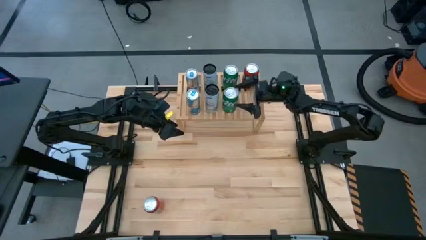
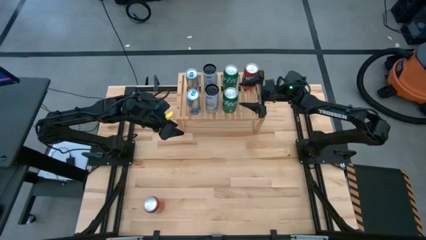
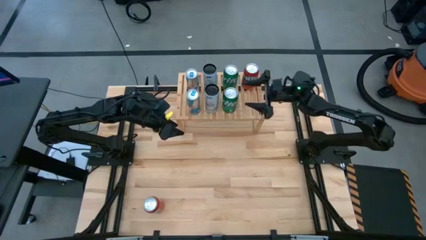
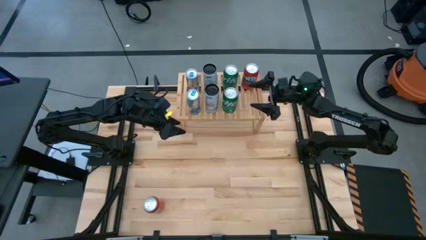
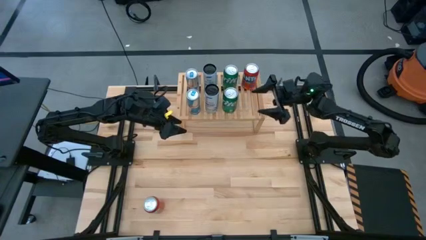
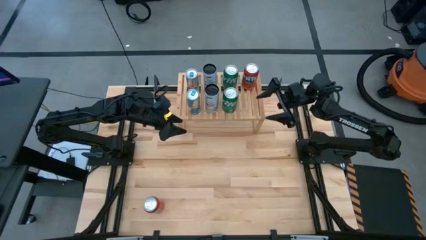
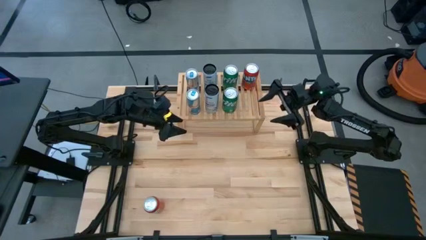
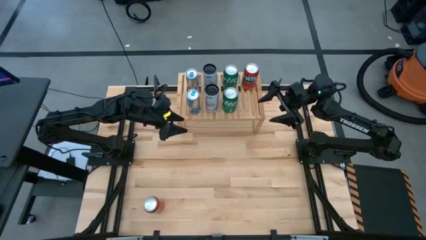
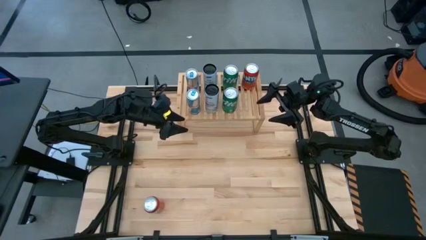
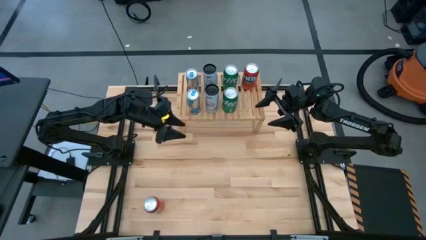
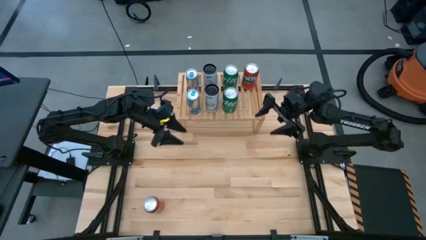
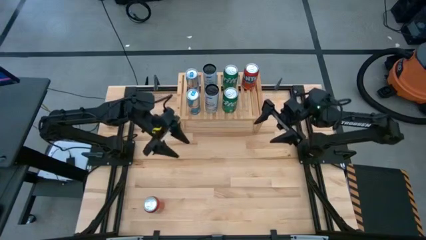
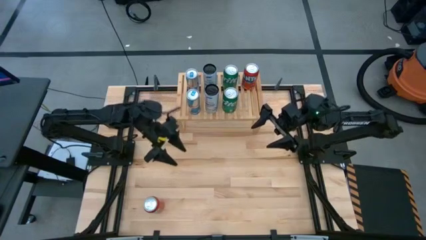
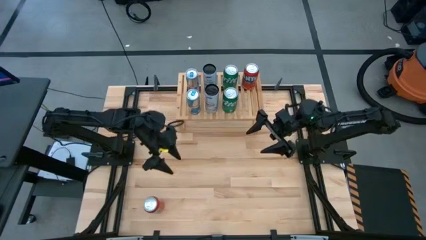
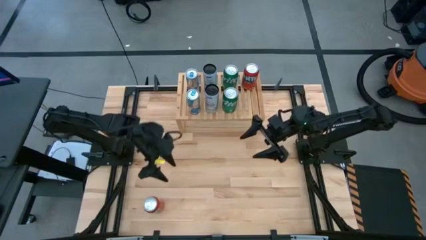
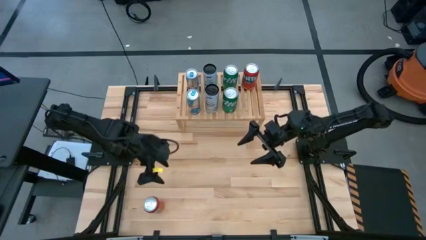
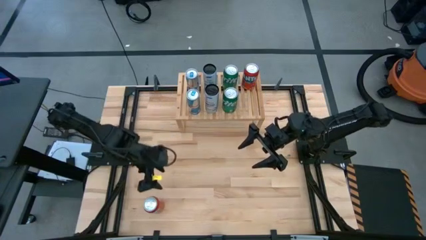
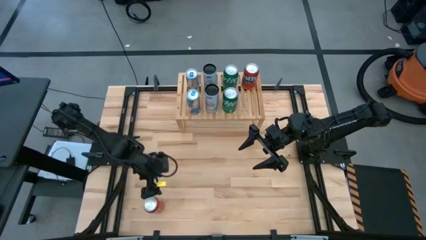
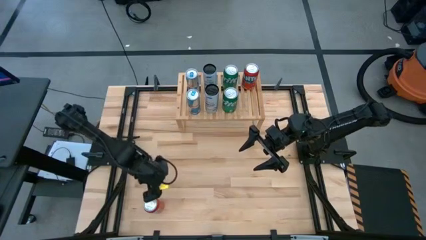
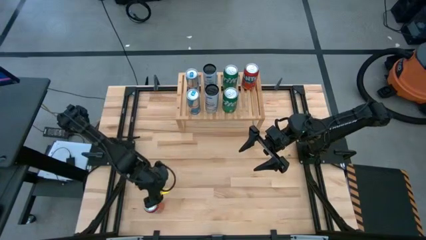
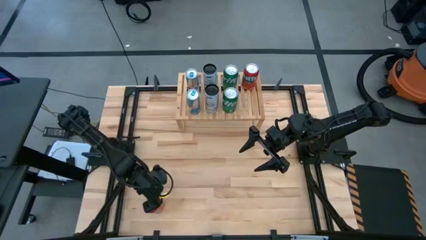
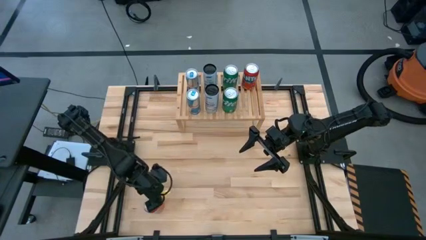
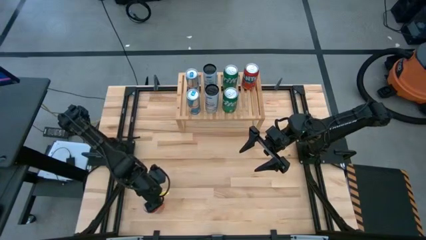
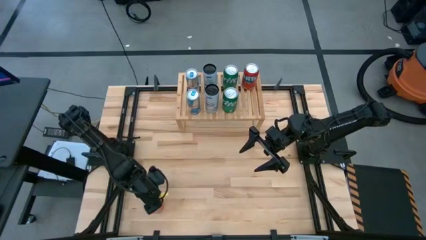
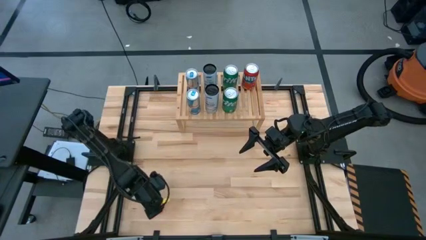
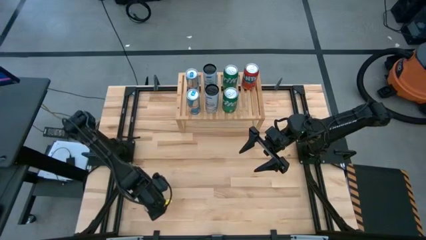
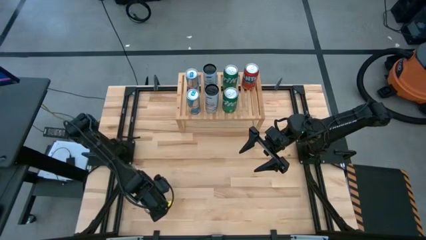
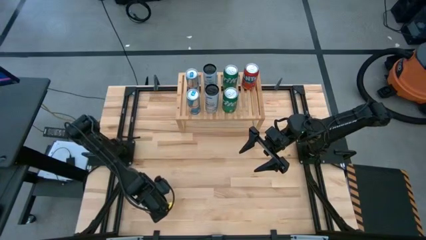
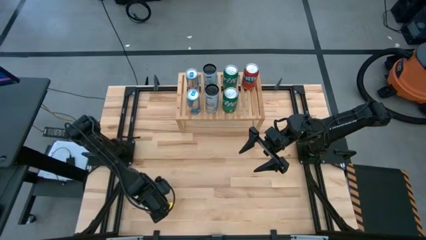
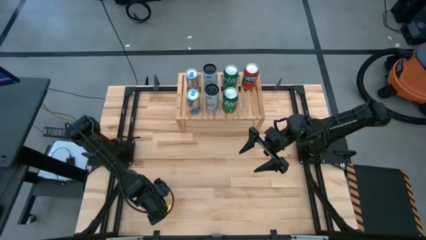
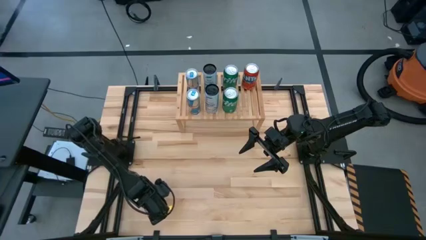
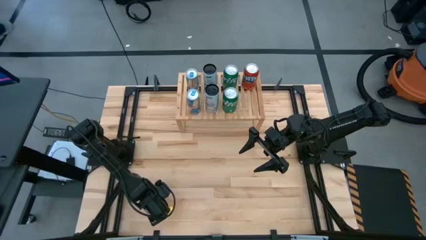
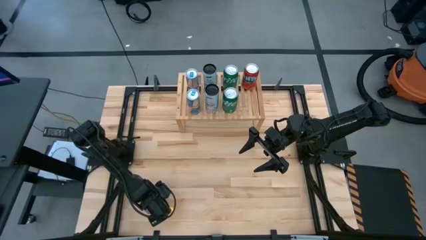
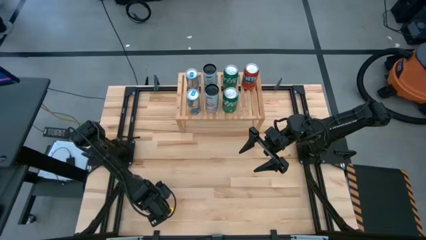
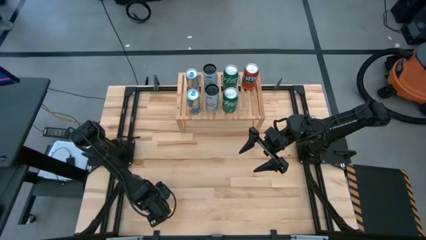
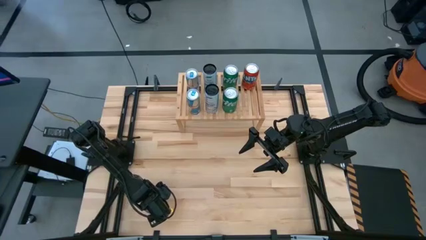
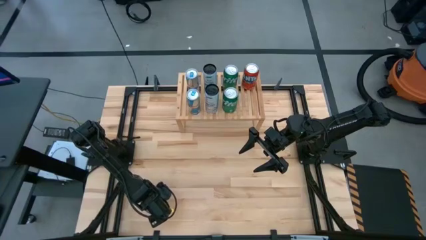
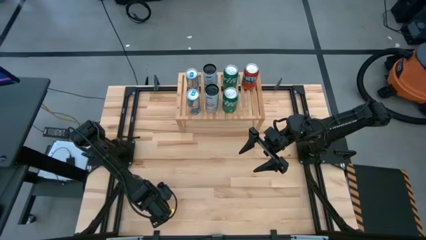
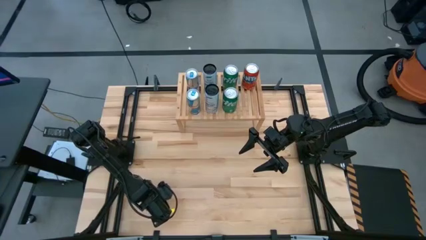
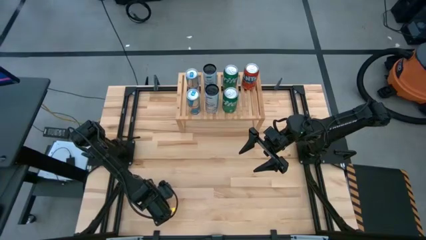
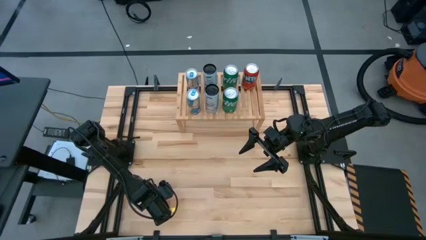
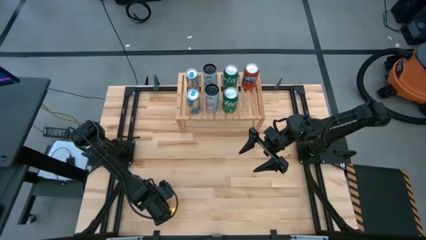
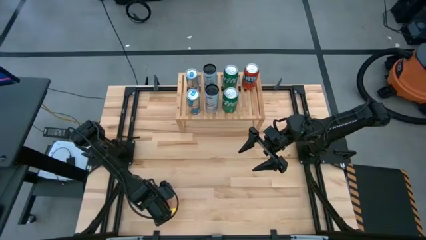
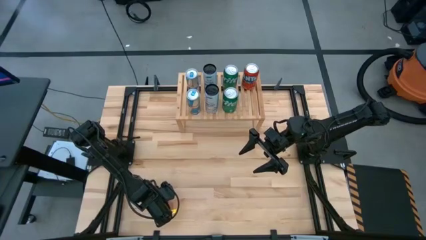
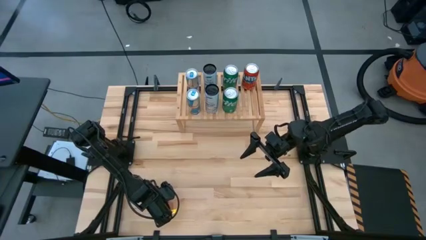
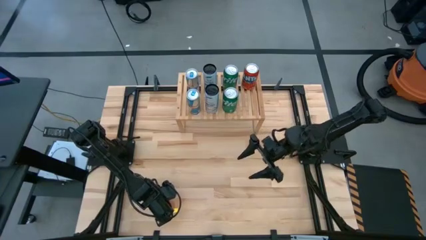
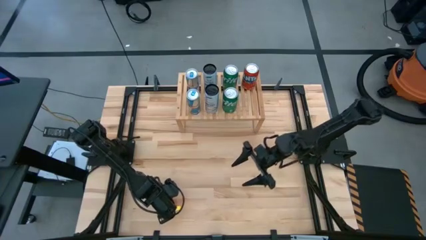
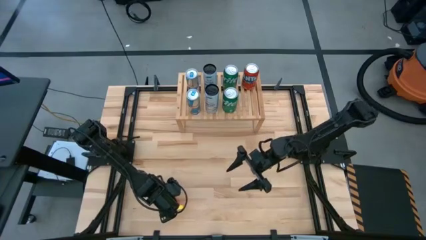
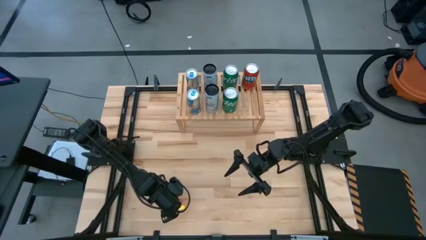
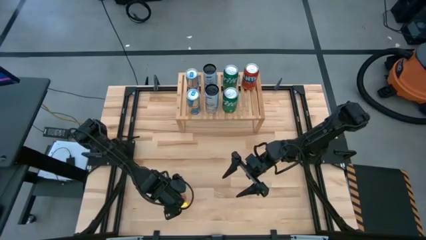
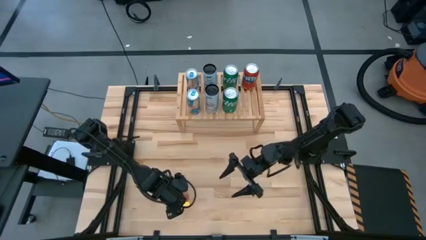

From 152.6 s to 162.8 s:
Task: Place canned beverage on shelf
Put the red soda can aligned with the other red soda can on the shelf
